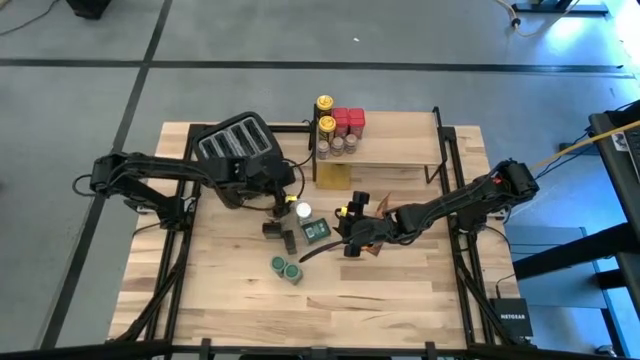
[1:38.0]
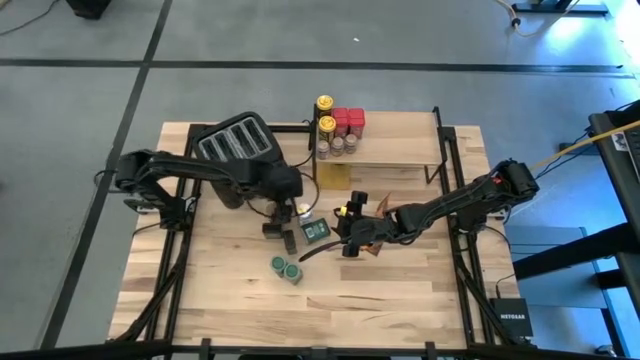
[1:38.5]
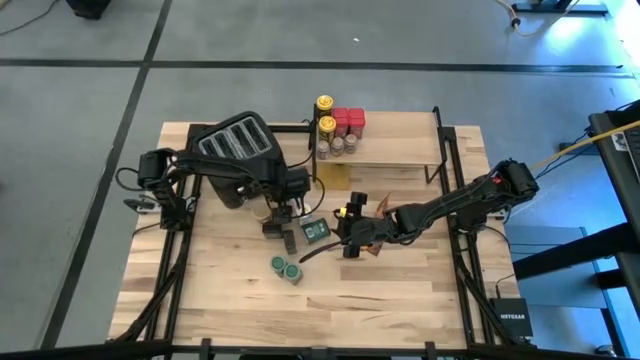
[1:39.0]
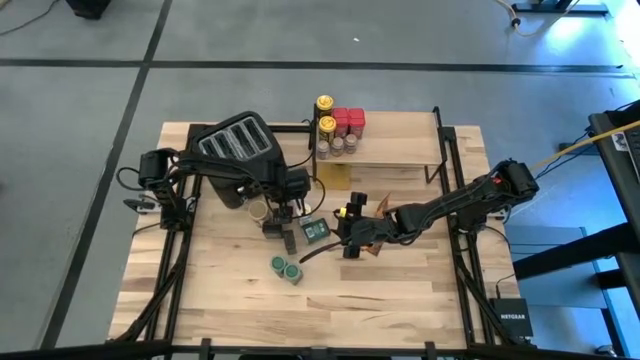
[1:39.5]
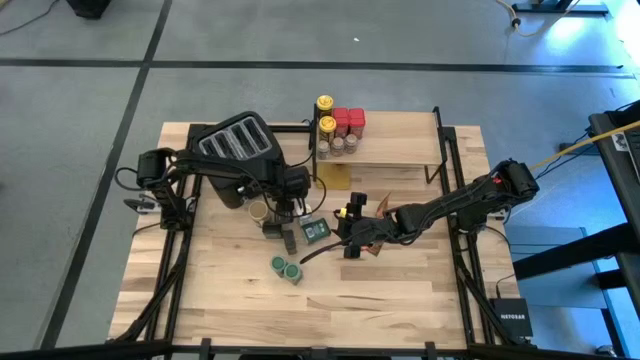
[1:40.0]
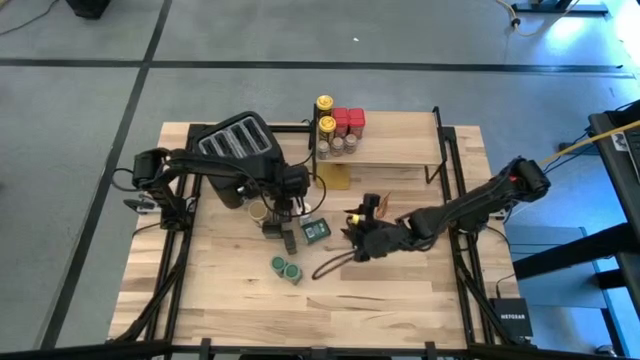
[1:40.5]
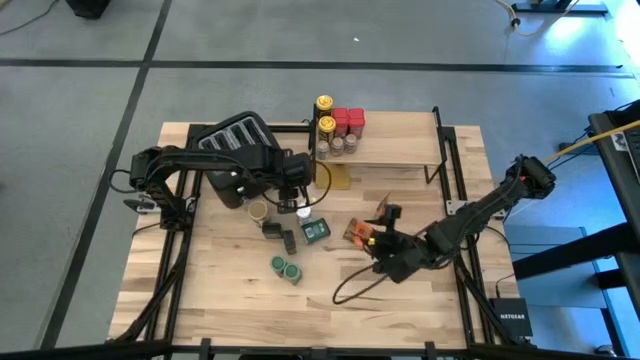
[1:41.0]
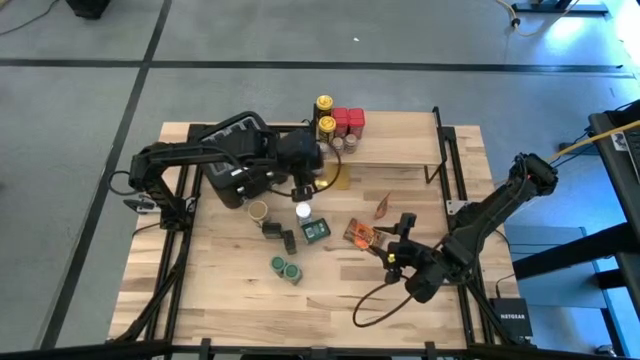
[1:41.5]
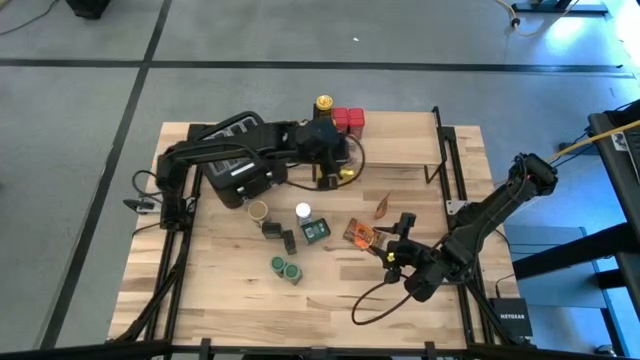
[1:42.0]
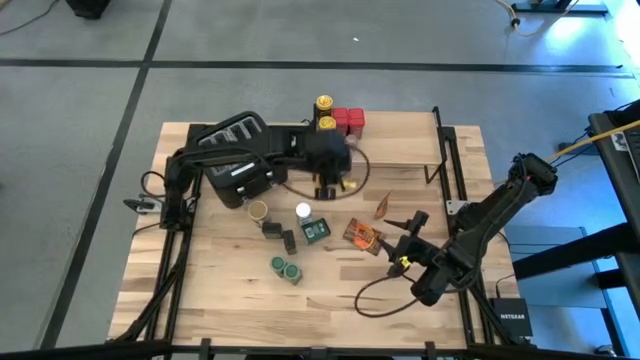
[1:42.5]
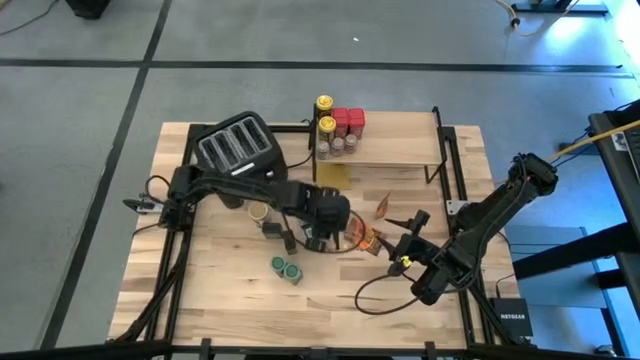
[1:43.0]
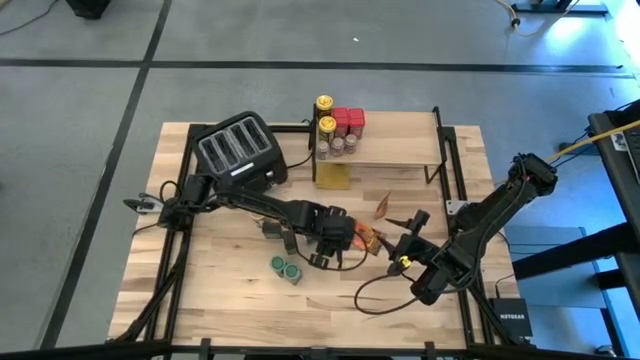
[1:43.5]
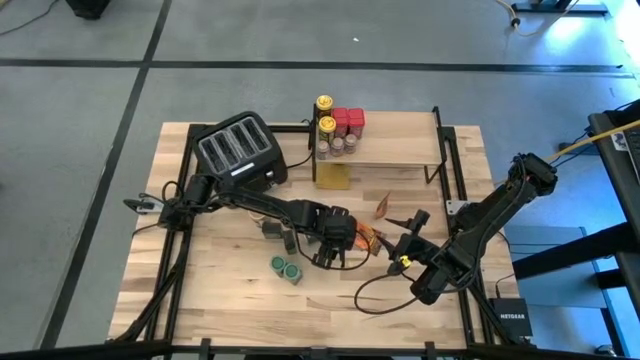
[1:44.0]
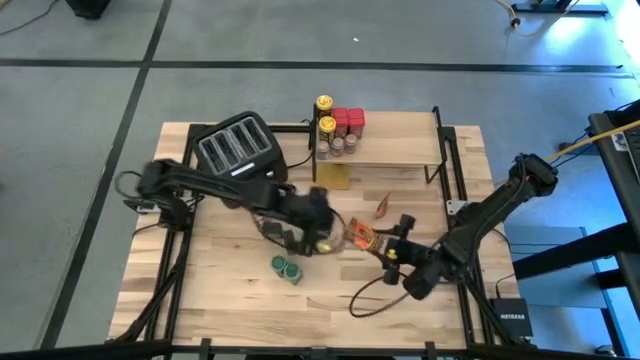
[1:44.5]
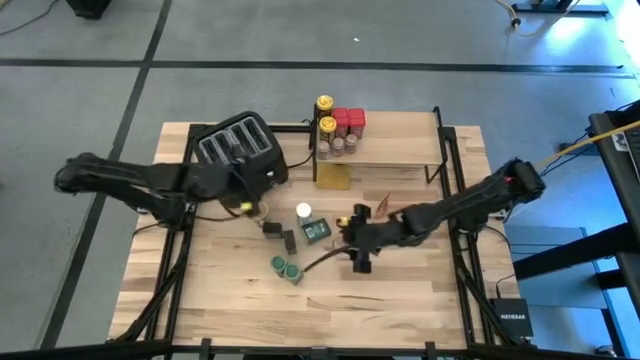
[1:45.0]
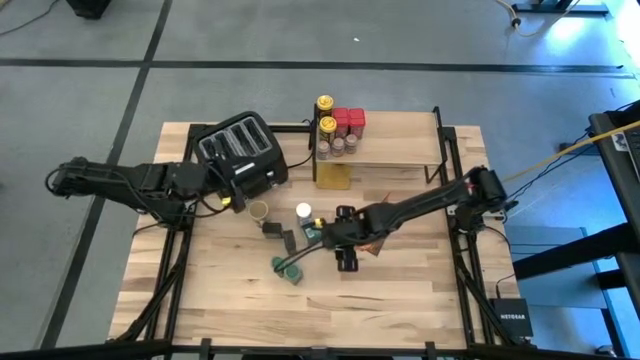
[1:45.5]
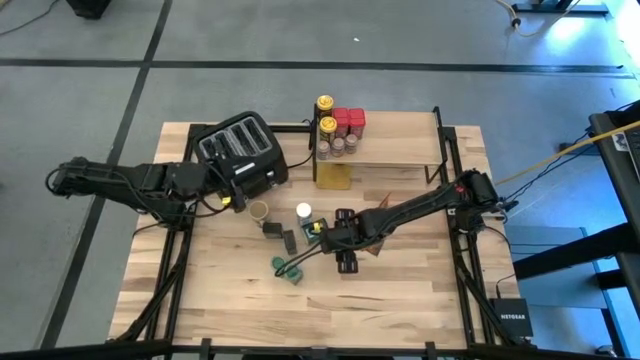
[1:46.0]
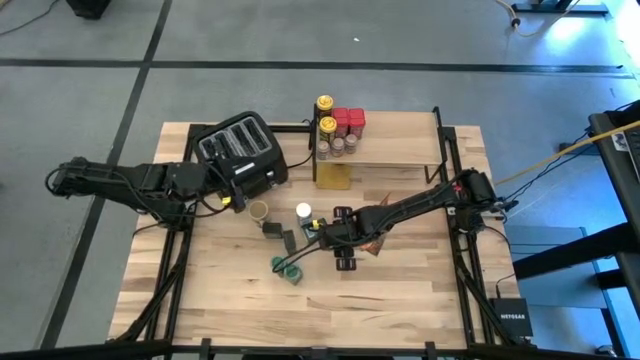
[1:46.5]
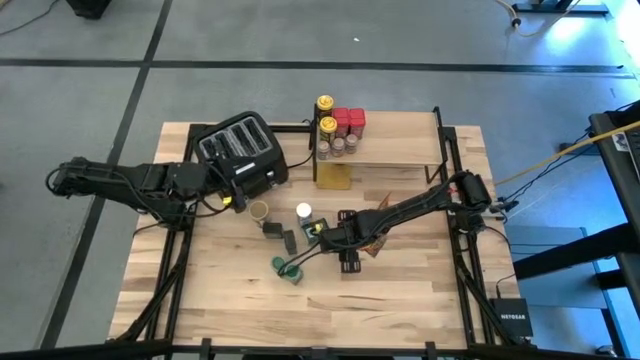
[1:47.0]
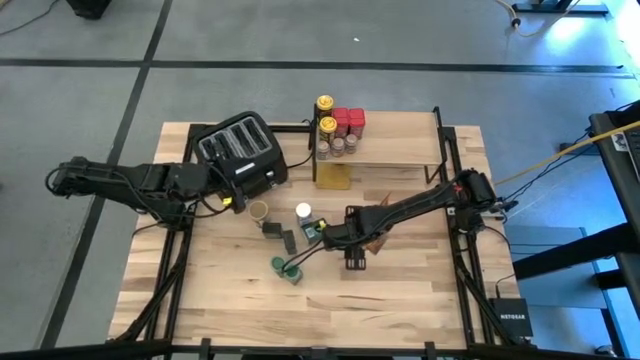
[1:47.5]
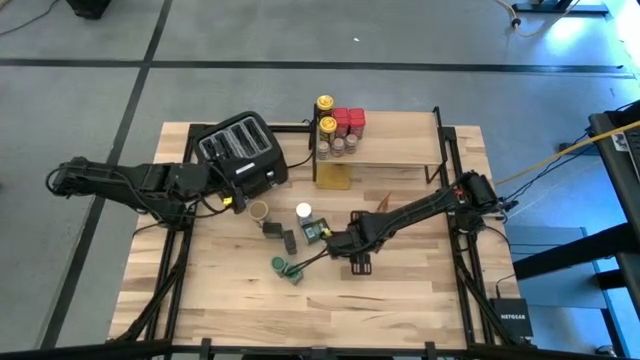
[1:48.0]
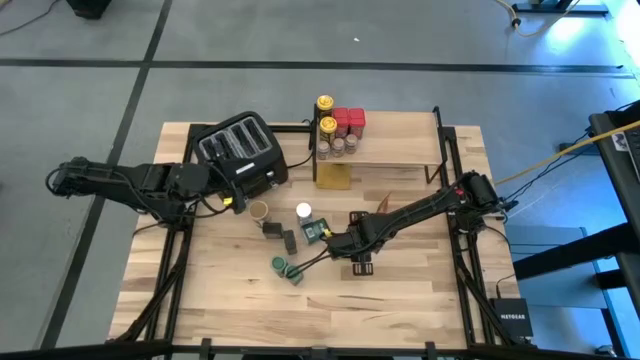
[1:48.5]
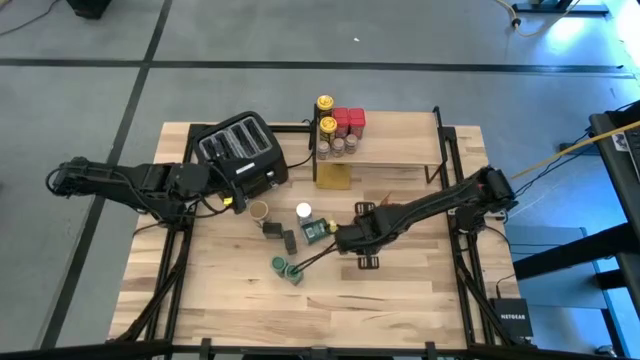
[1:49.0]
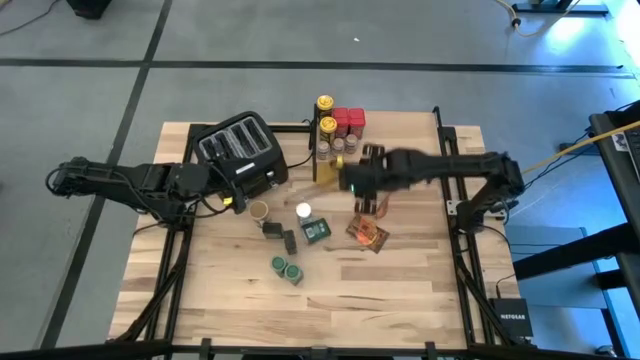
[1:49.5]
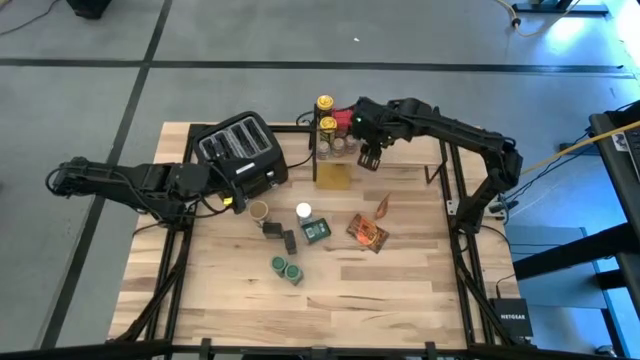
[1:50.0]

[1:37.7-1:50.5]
Task: Shelf spices
Put the brown seasoning bottle on the shelf

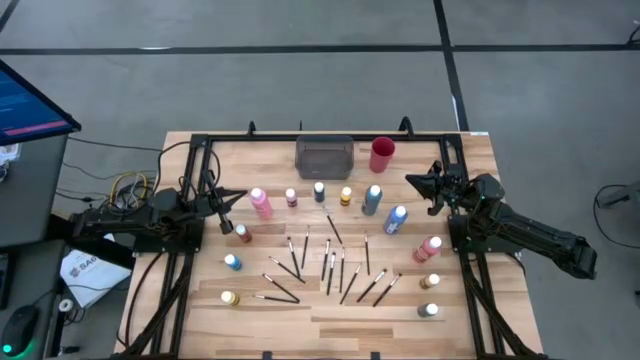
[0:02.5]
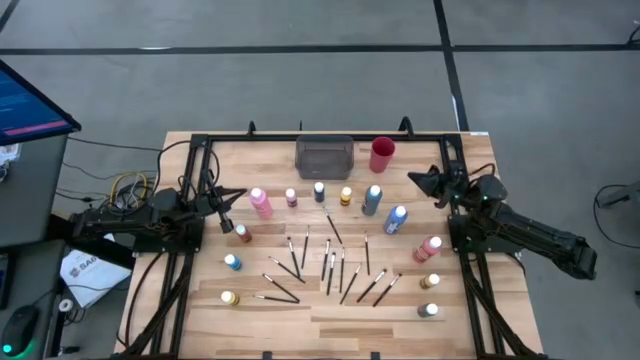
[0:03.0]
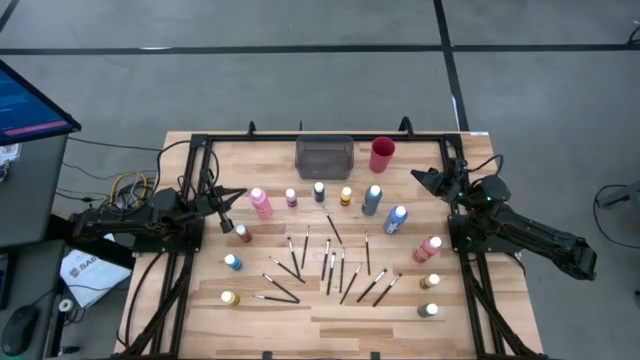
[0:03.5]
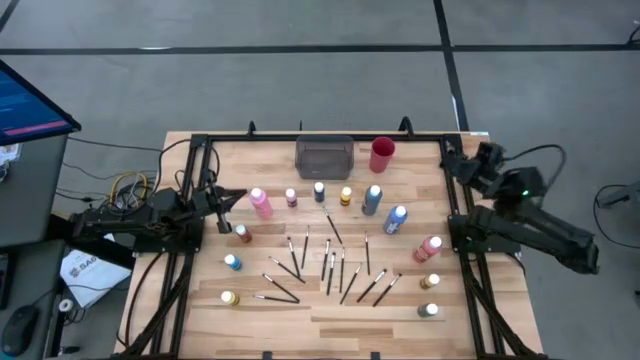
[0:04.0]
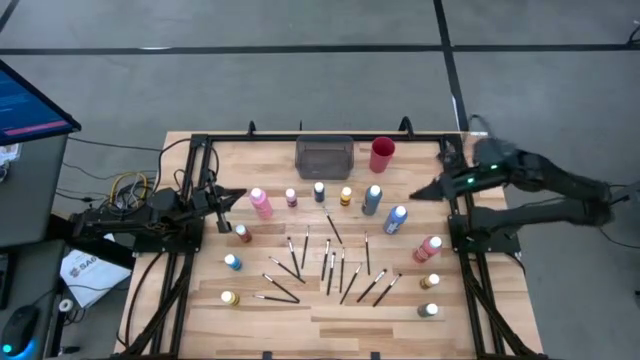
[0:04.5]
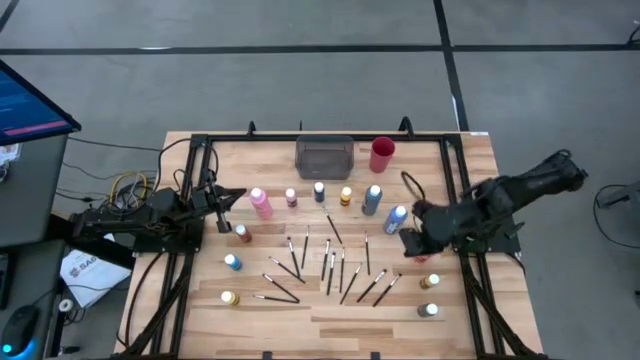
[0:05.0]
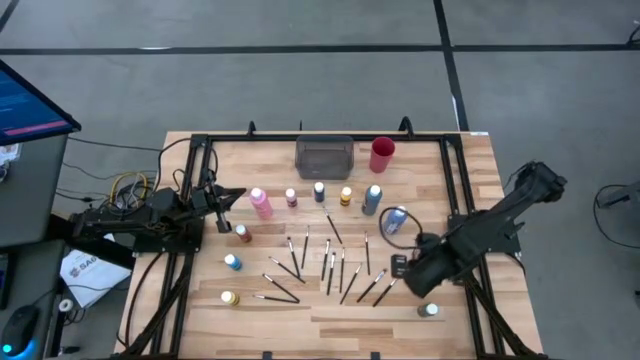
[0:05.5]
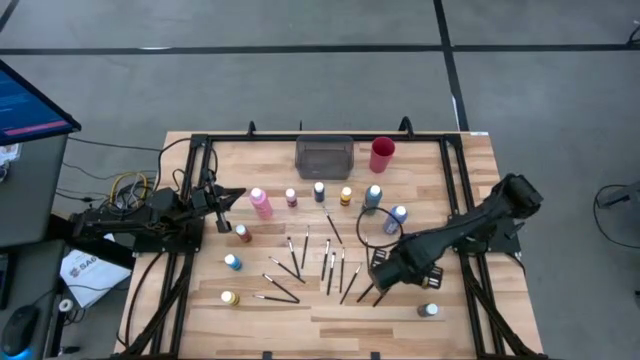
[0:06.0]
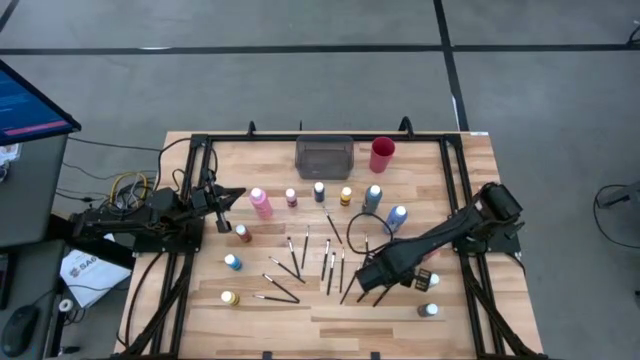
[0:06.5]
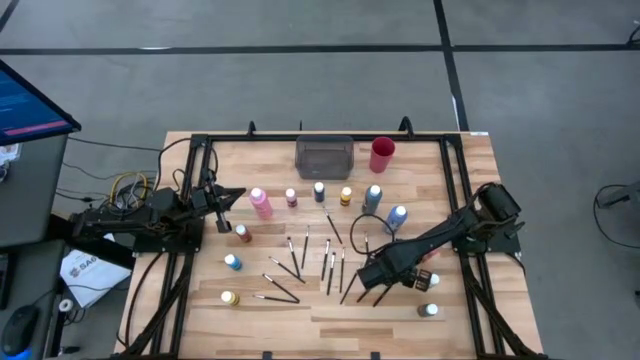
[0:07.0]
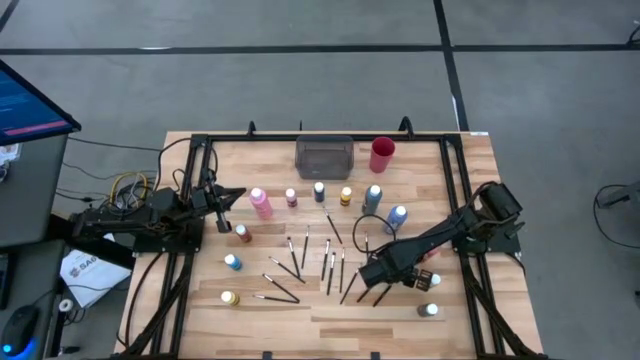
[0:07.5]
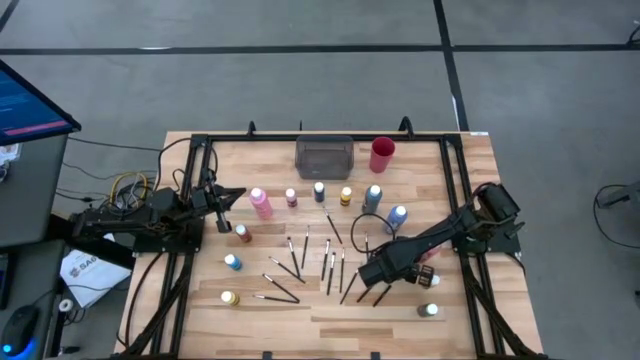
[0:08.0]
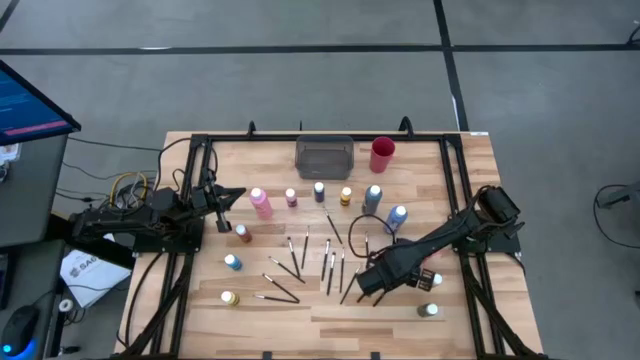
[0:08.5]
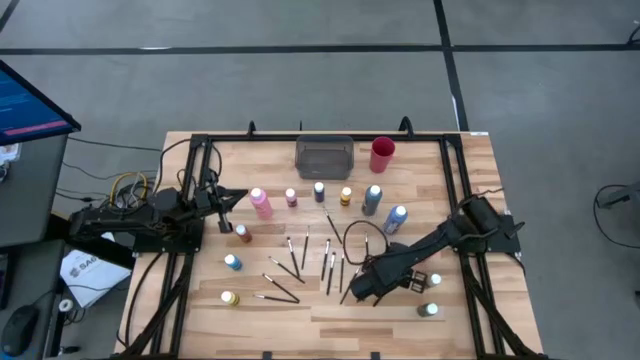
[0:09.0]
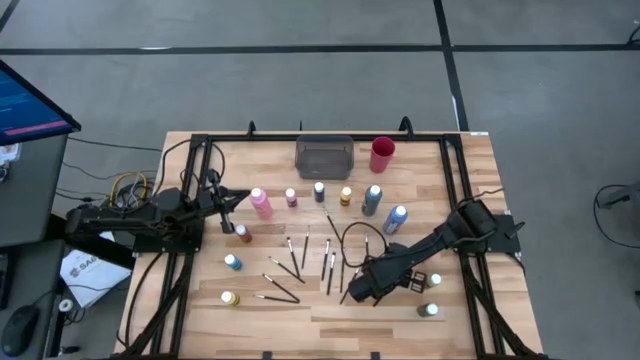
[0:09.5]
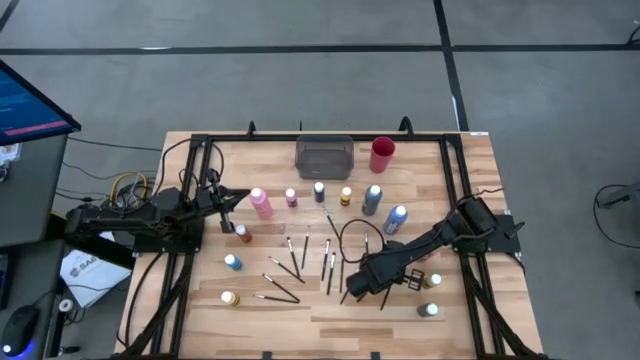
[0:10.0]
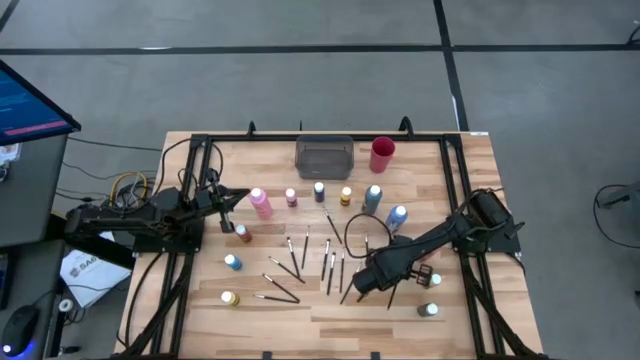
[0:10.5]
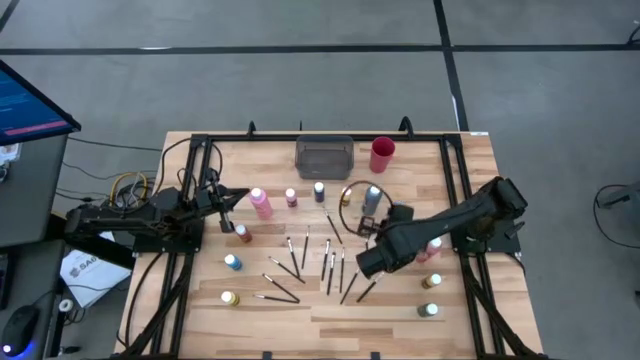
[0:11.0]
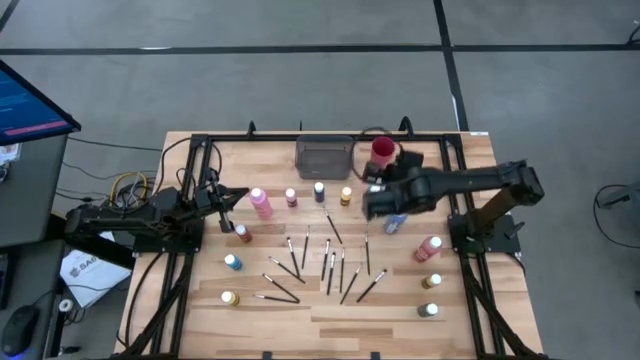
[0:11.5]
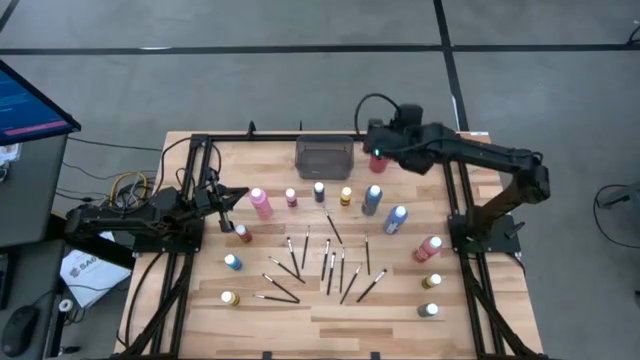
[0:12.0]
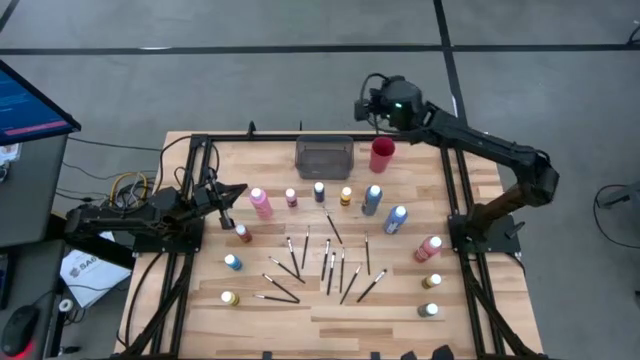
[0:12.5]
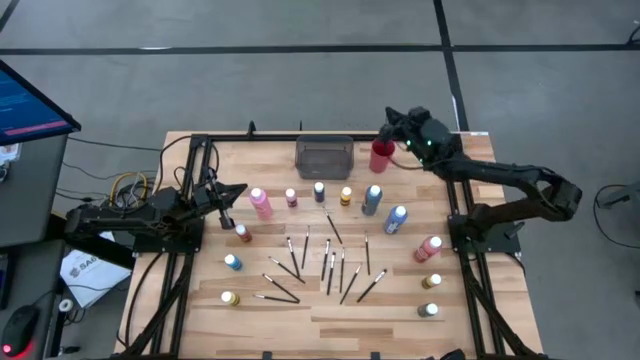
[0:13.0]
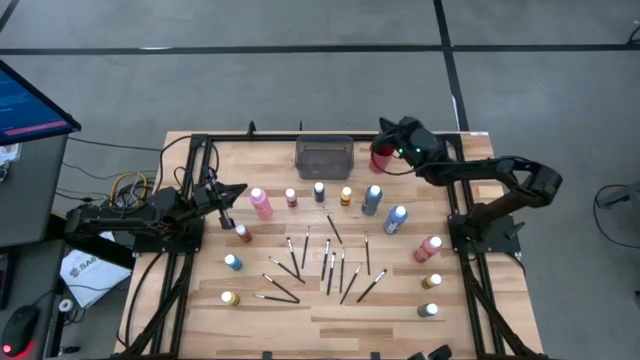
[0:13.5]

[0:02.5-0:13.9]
Task: Pick & Place Paint Supplies
Put the black paintbrush into the red cup
